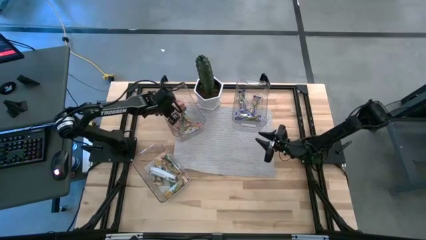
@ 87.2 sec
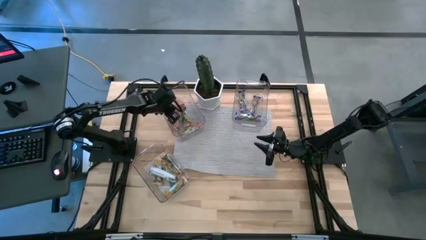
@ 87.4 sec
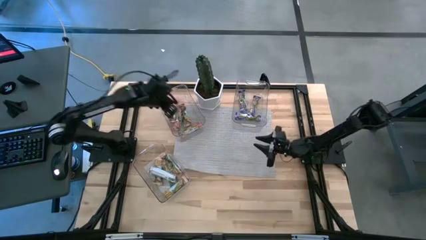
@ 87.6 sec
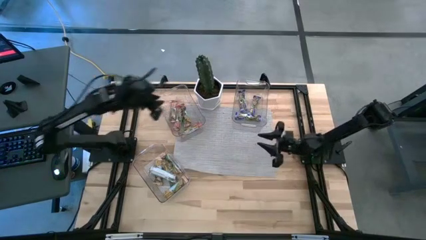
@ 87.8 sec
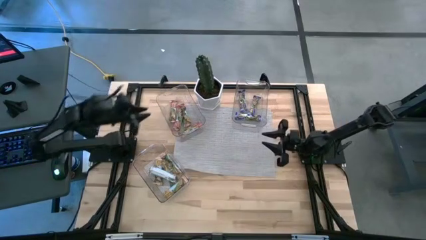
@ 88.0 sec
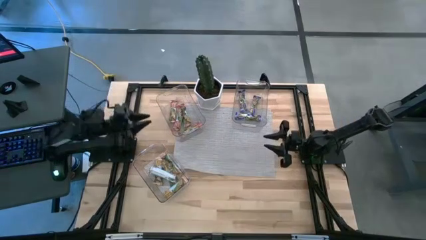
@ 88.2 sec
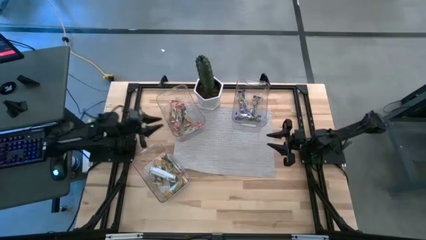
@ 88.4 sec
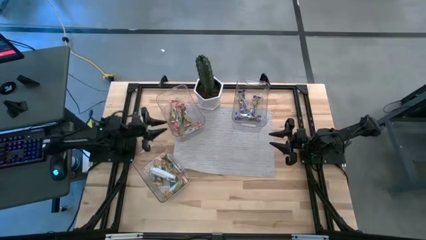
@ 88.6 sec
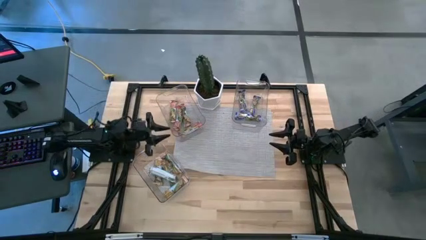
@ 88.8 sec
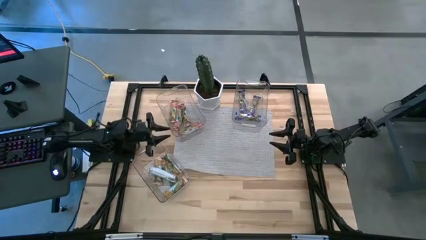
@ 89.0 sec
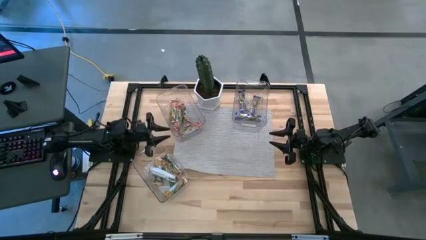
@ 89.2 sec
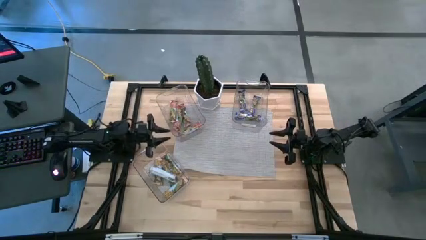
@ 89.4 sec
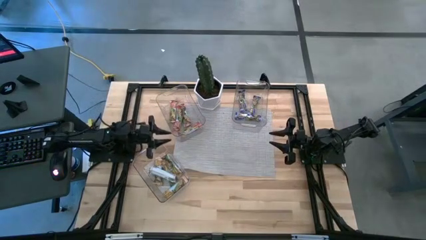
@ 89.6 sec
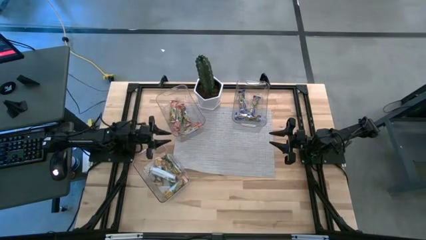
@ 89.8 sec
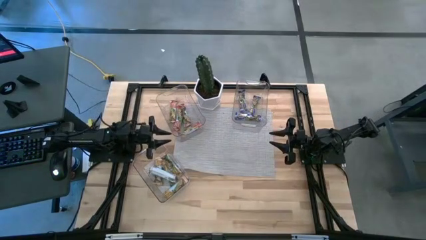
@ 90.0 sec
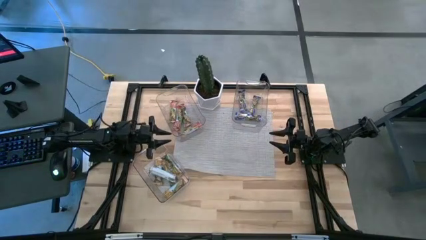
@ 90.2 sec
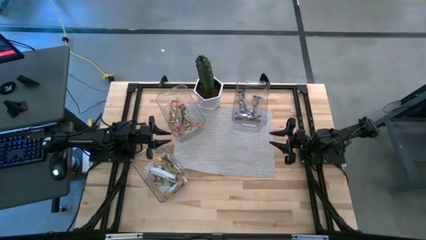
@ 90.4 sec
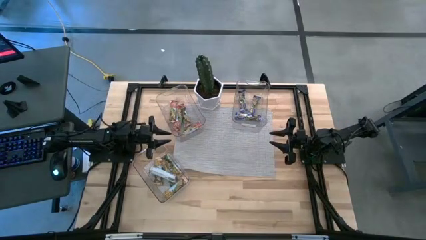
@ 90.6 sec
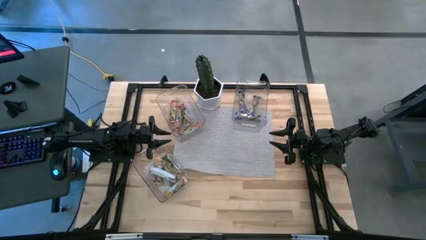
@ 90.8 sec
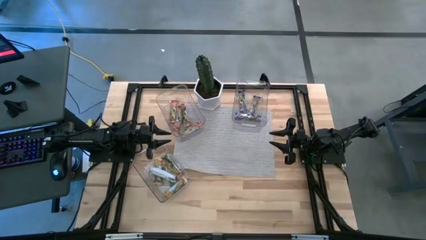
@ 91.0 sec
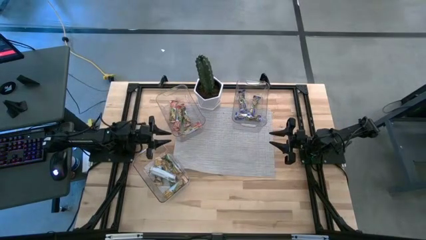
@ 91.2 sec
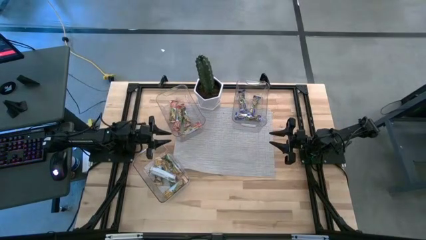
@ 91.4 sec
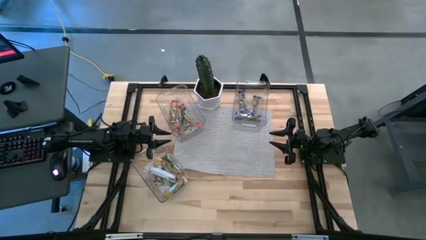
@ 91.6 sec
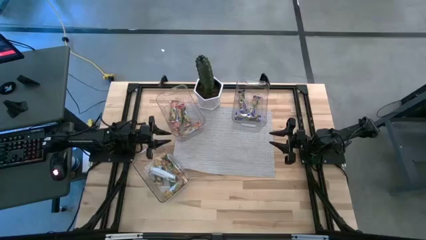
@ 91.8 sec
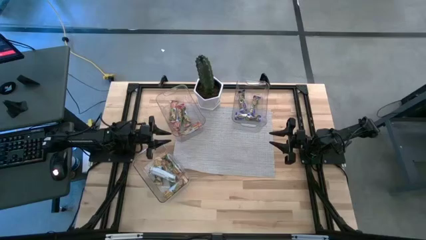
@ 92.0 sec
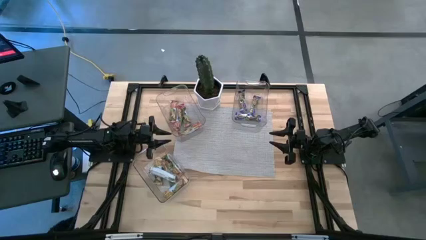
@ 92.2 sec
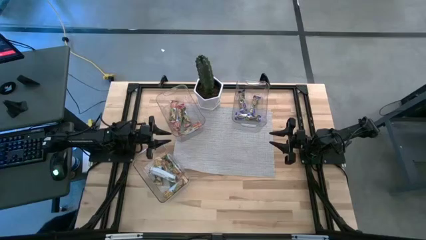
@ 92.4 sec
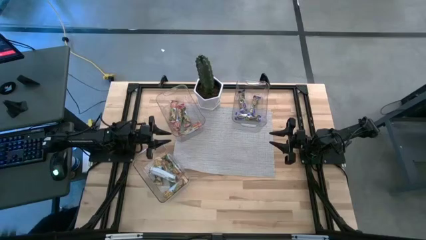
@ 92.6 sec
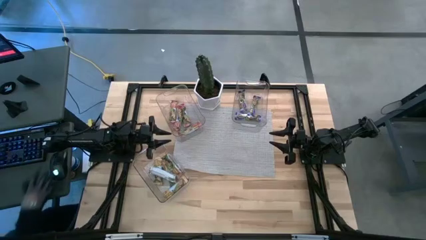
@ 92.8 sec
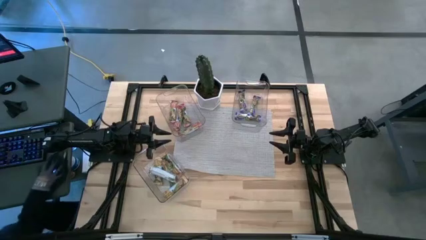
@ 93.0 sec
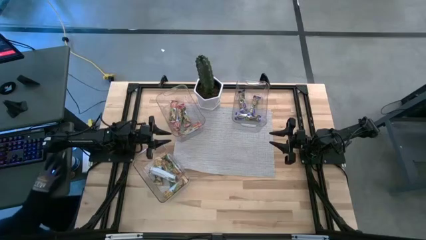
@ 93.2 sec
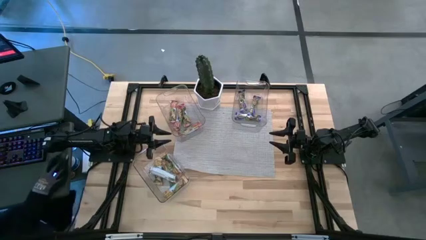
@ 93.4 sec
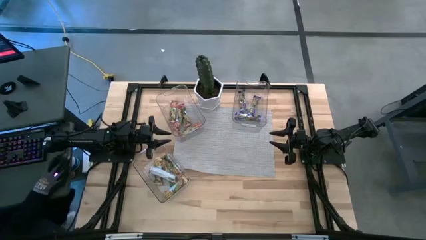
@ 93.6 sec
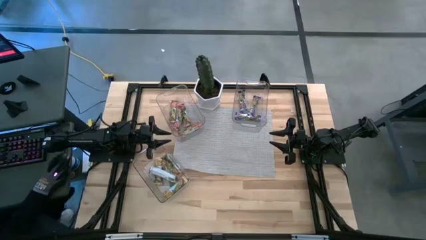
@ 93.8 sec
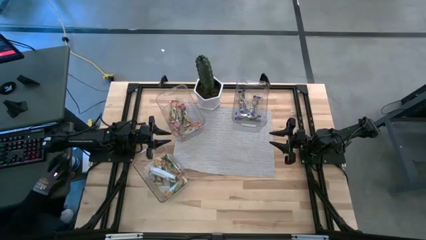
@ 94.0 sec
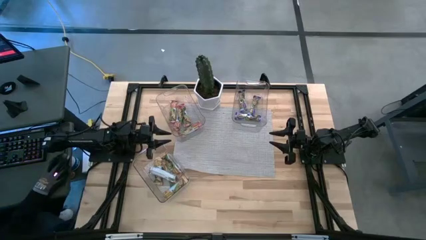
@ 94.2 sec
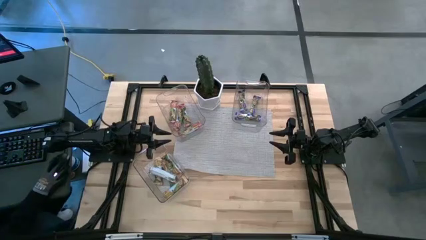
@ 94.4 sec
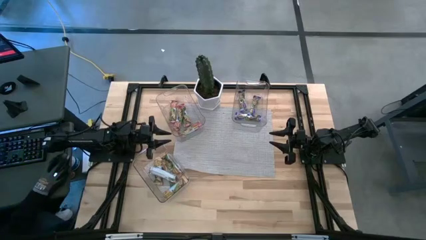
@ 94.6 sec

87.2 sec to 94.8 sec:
Task: Pick and place Granola Bars by type
Return to Home Position

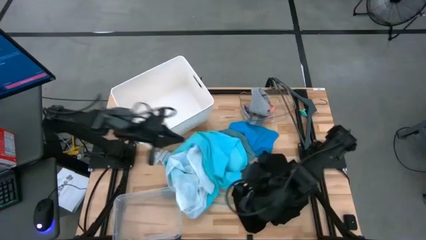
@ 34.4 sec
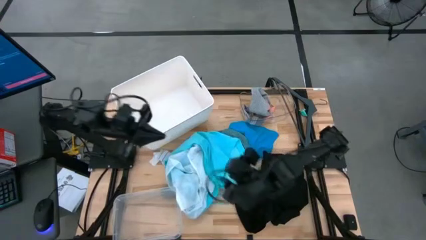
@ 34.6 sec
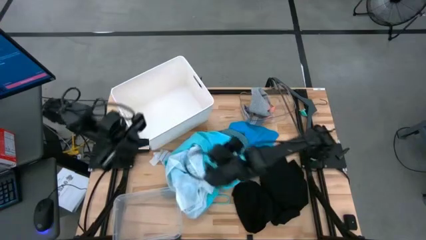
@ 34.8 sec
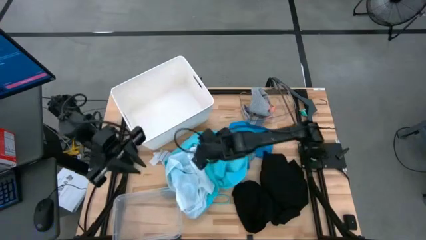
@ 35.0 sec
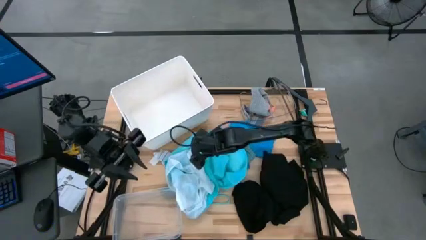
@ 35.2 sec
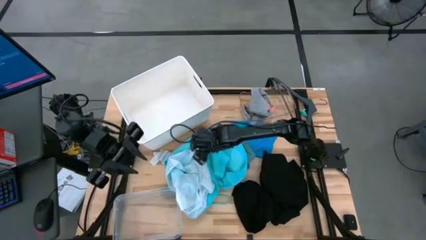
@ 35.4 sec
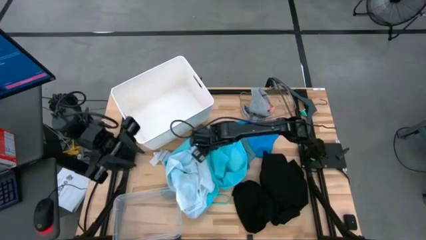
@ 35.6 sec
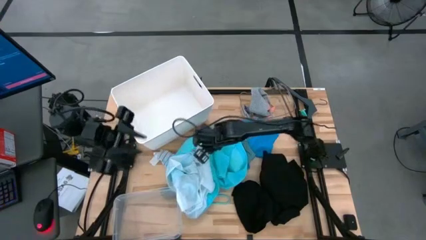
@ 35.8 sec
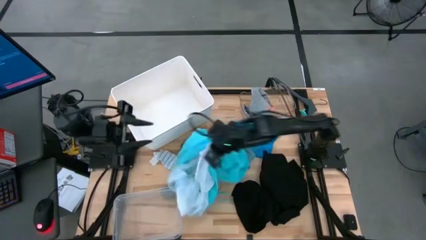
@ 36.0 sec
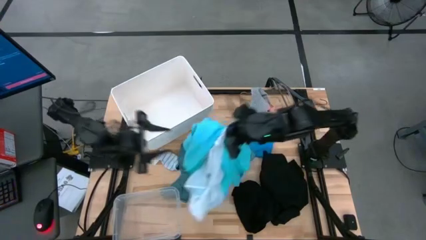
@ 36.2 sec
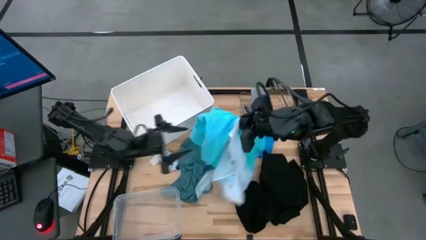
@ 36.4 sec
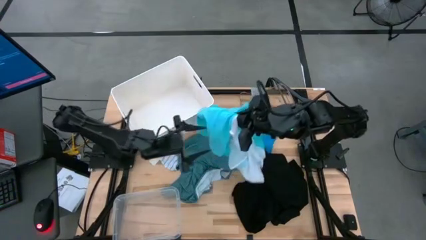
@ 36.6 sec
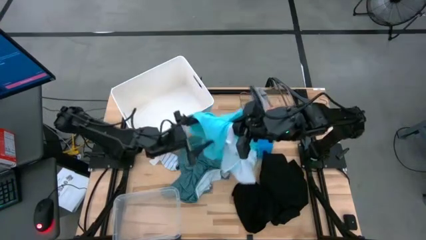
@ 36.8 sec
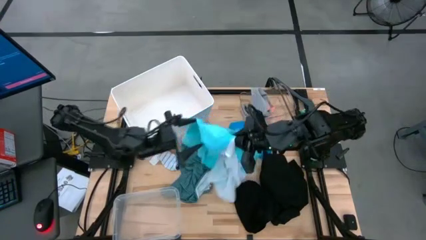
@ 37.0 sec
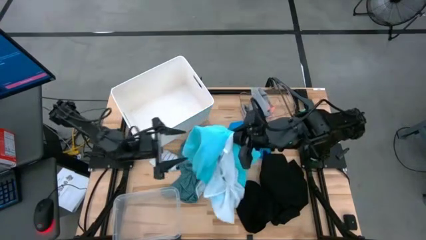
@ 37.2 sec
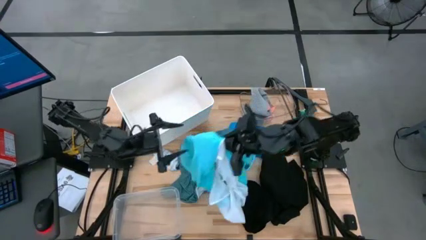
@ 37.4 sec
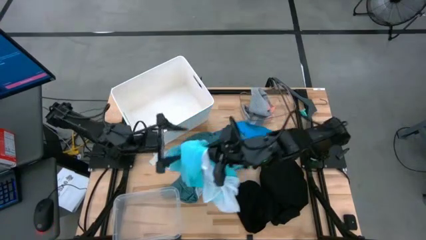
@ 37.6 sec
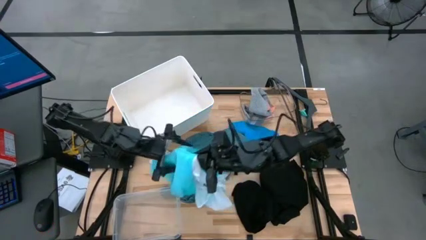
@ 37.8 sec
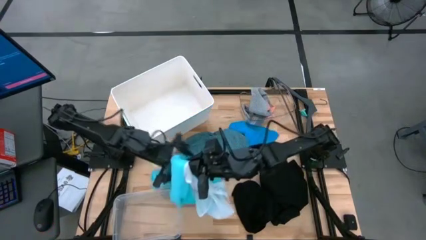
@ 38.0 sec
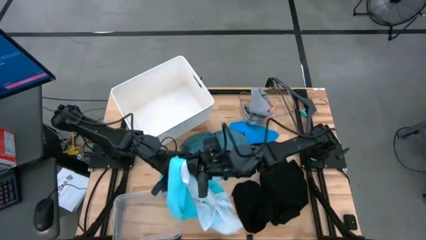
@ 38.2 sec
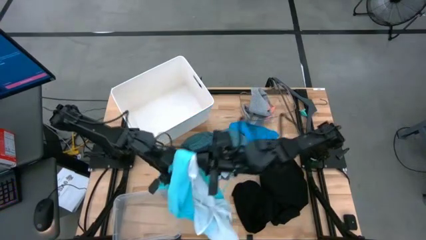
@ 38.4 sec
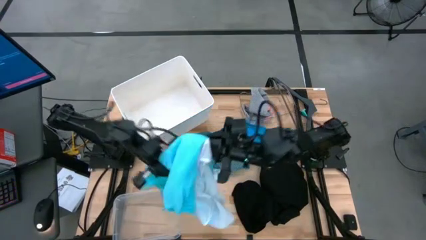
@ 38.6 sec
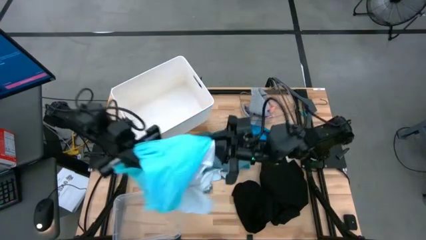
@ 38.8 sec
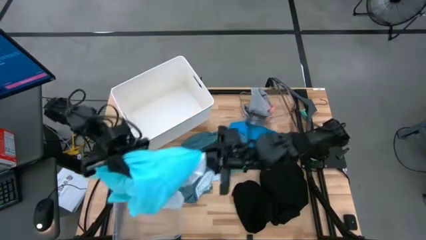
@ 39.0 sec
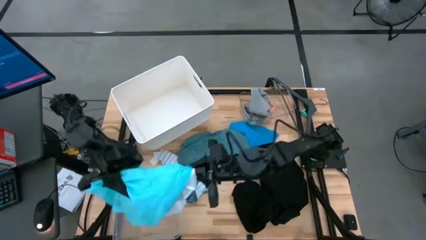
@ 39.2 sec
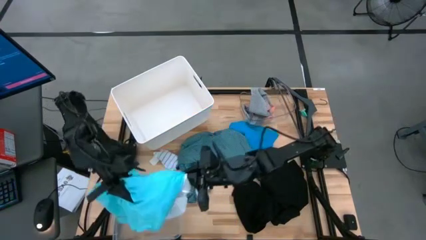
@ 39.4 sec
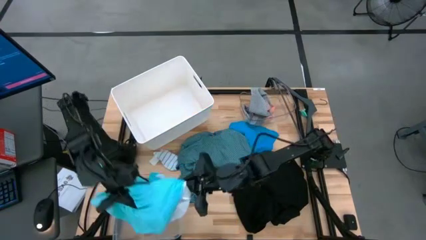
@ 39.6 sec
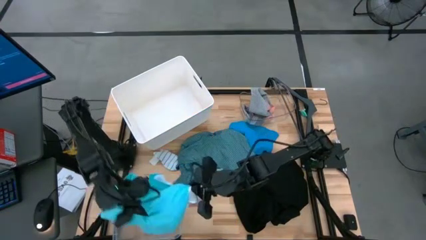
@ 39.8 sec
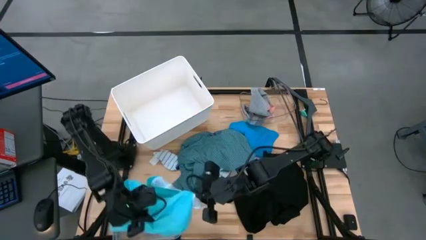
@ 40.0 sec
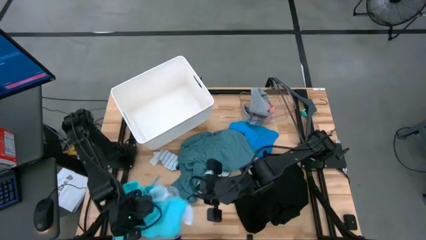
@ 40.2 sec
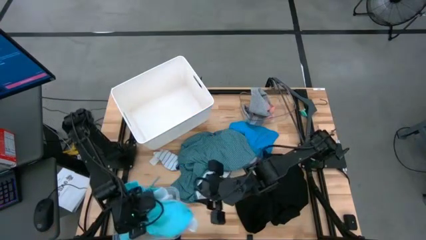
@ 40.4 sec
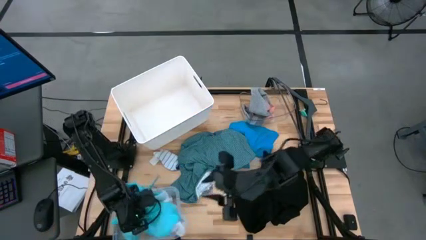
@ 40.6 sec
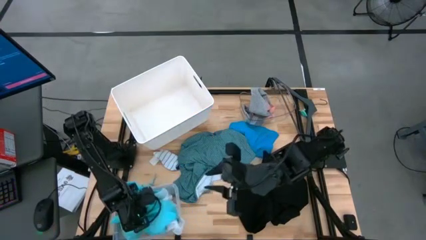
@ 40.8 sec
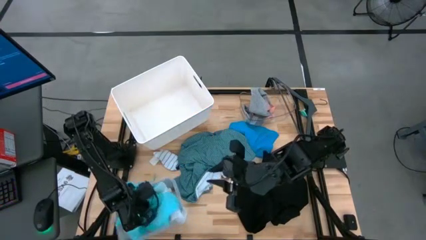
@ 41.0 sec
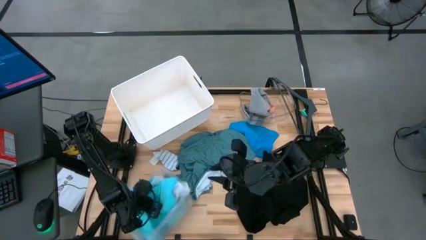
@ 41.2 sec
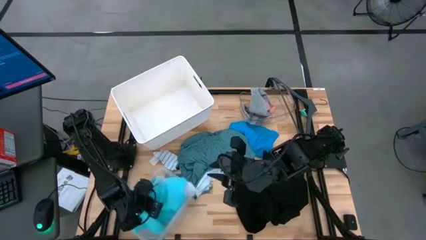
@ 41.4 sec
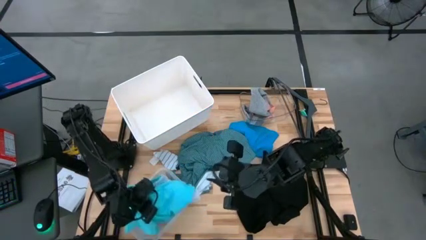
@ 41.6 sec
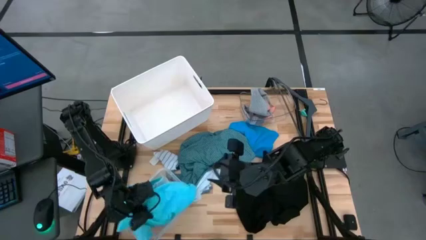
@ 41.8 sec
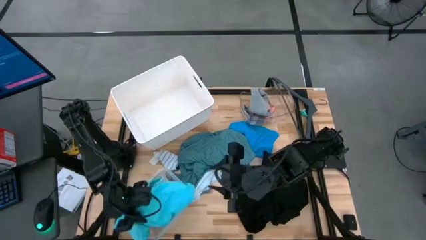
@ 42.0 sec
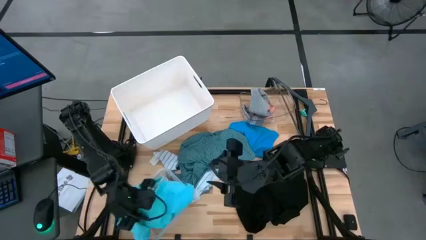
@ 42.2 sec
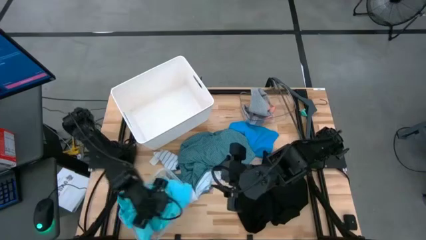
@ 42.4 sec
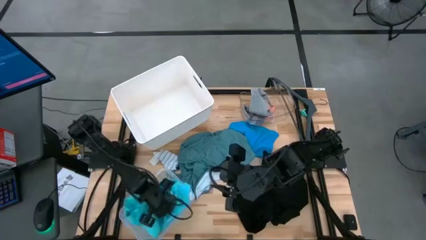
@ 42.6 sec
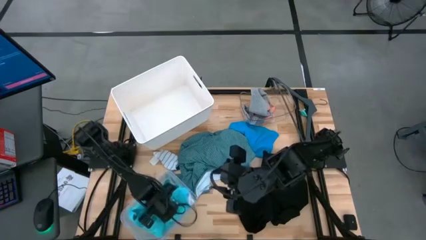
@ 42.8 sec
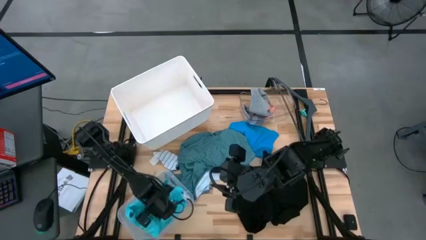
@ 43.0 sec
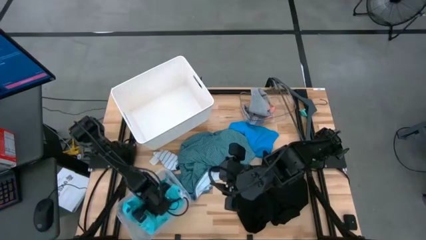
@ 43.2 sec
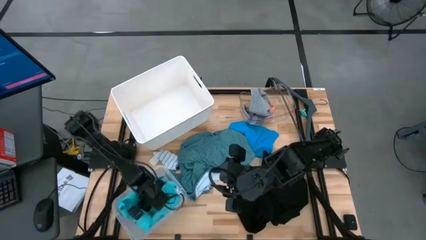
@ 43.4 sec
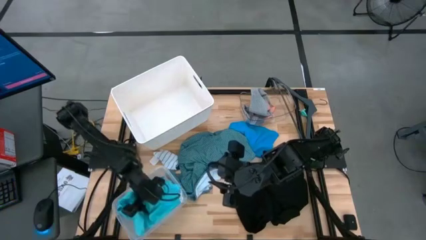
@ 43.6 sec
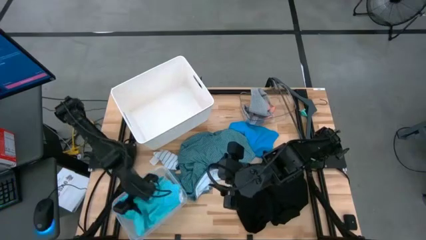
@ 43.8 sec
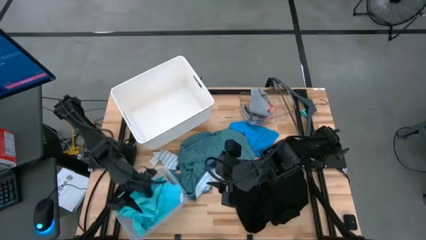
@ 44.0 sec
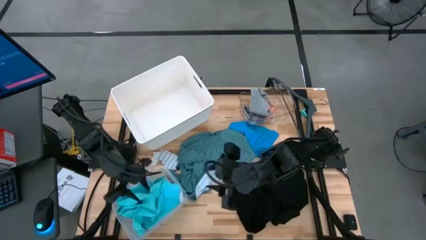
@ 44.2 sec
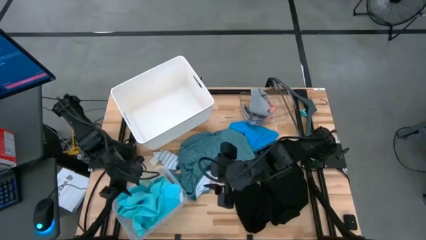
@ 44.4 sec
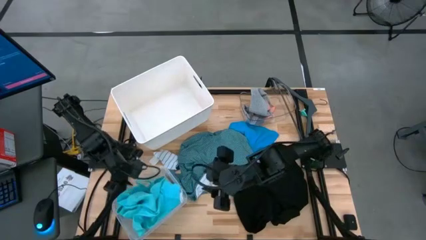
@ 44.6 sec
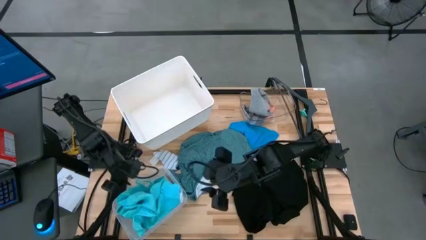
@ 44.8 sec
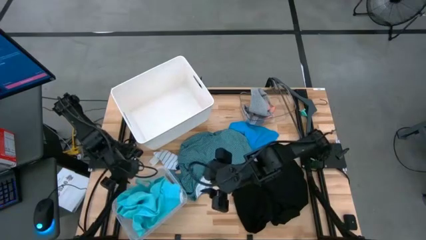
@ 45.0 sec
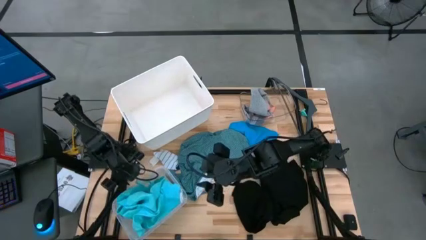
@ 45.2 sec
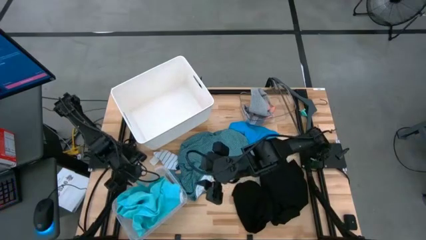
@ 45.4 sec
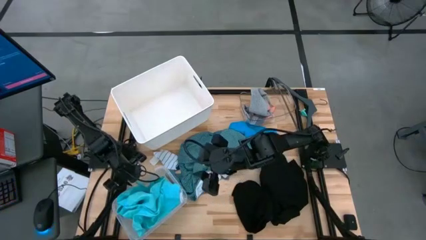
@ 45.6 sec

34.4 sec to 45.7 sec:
Task: Pick & Place Cloths
Put the light blue shorts into the bottom transparent bin
